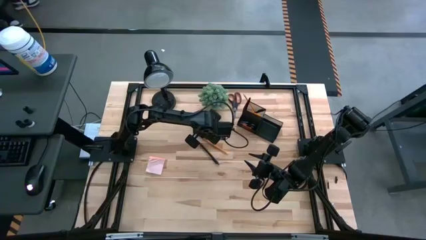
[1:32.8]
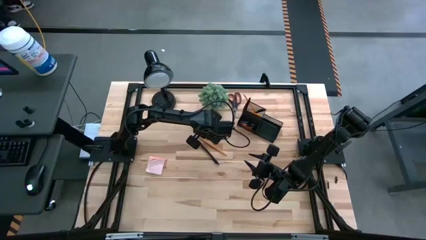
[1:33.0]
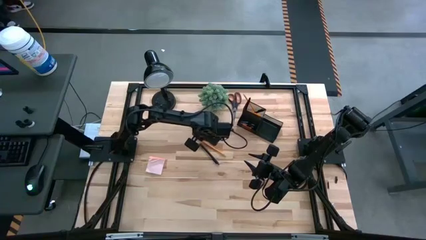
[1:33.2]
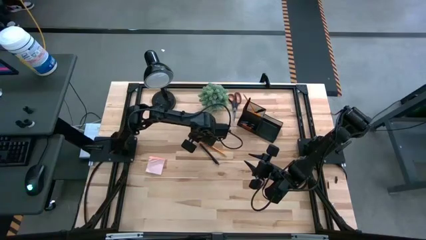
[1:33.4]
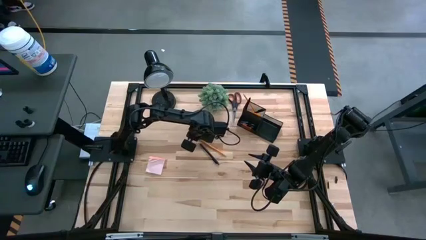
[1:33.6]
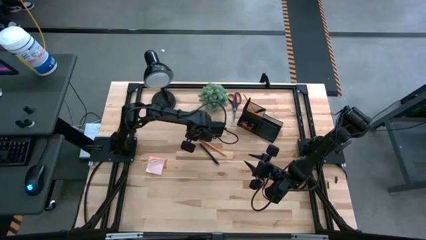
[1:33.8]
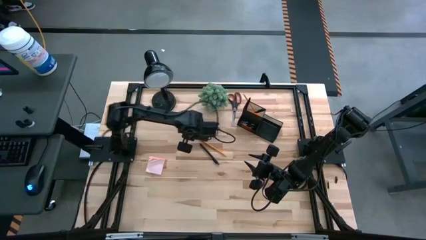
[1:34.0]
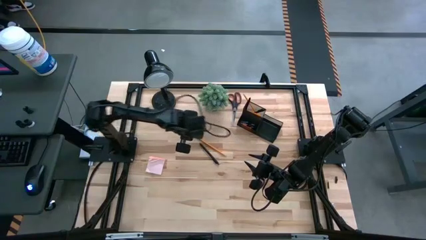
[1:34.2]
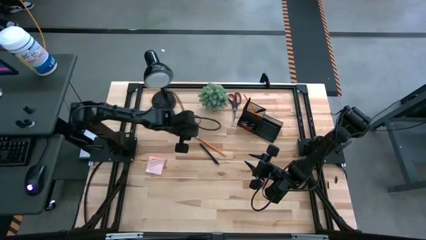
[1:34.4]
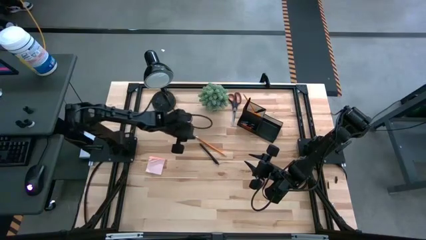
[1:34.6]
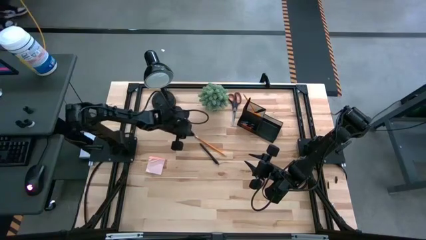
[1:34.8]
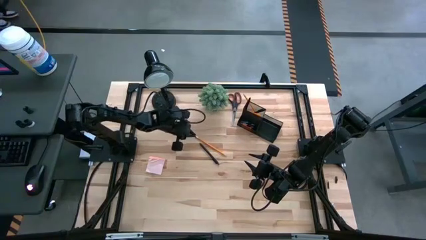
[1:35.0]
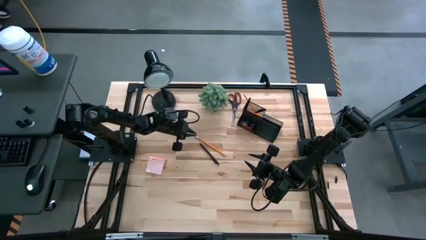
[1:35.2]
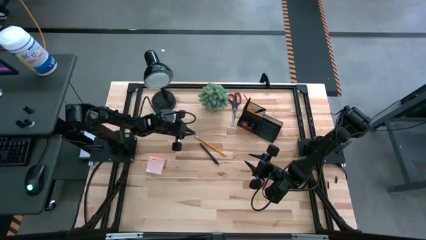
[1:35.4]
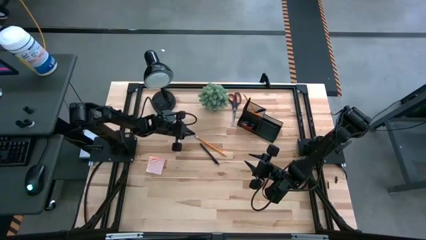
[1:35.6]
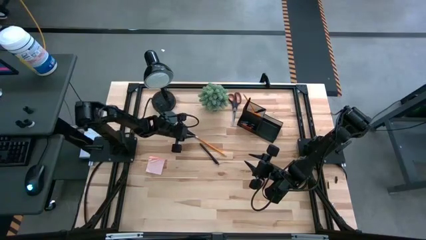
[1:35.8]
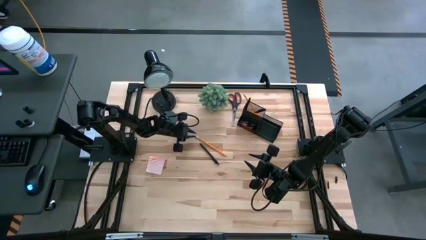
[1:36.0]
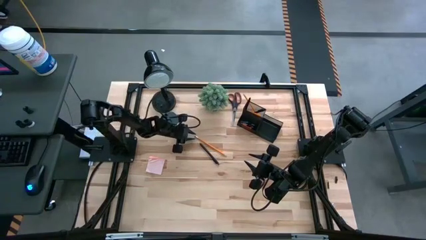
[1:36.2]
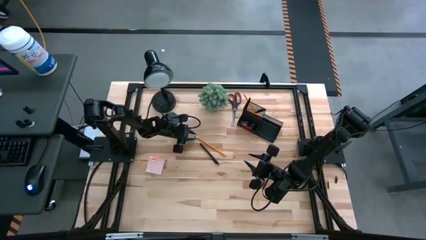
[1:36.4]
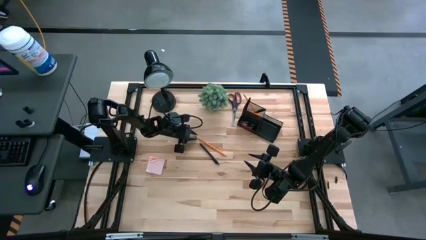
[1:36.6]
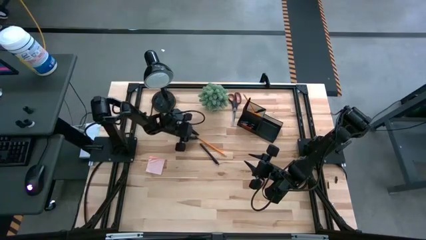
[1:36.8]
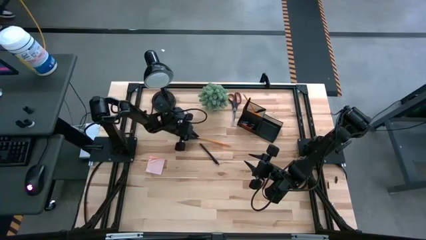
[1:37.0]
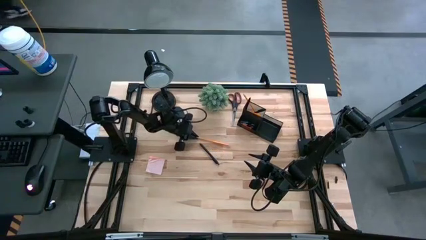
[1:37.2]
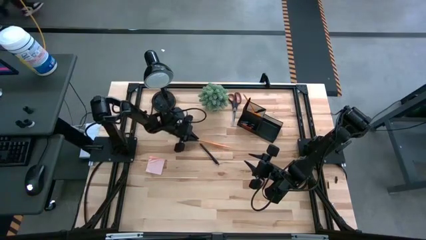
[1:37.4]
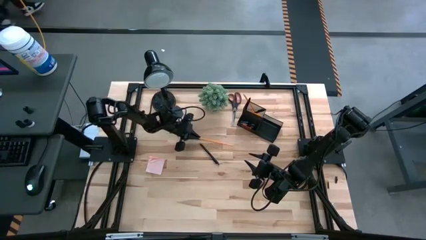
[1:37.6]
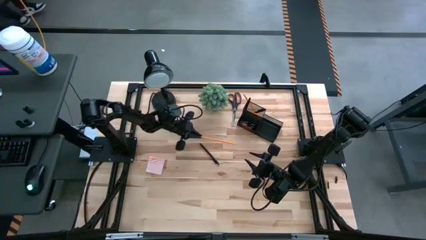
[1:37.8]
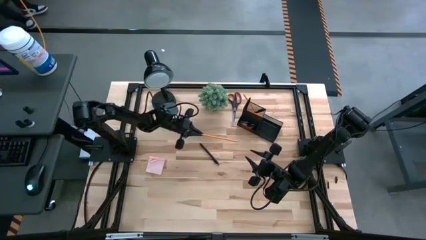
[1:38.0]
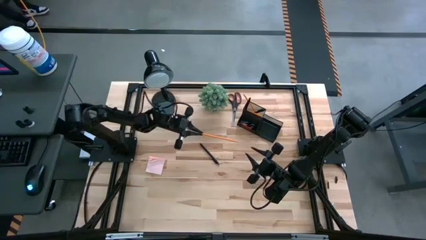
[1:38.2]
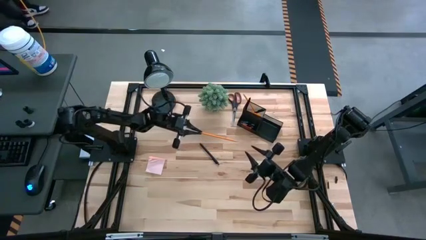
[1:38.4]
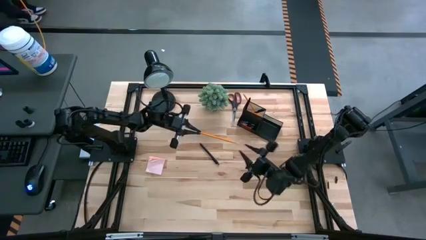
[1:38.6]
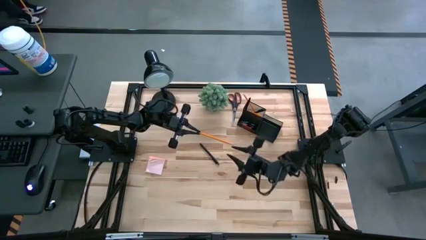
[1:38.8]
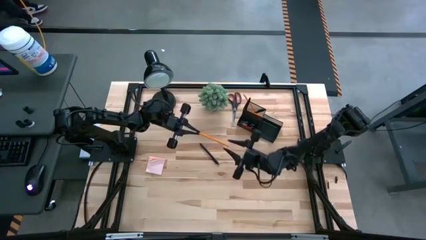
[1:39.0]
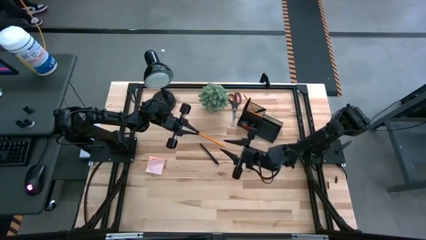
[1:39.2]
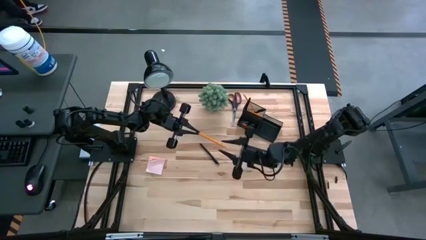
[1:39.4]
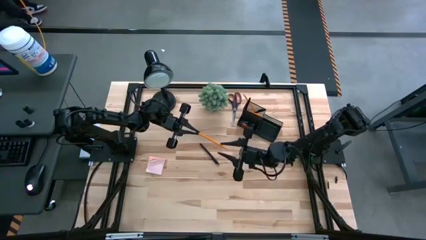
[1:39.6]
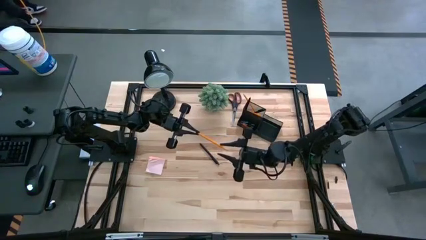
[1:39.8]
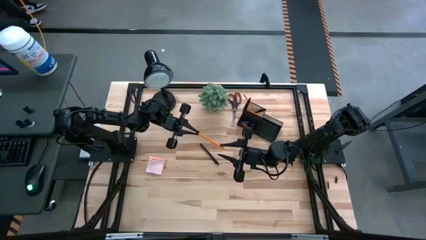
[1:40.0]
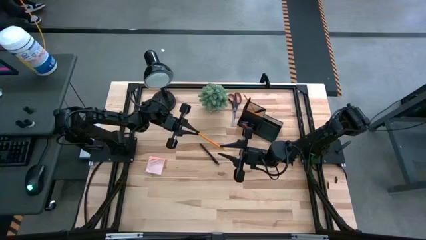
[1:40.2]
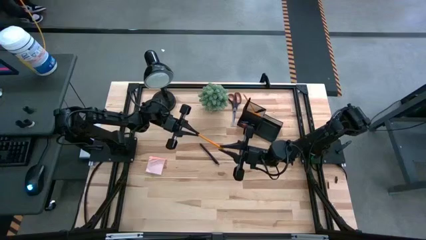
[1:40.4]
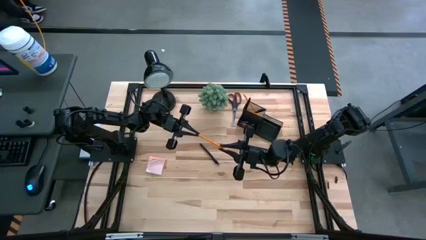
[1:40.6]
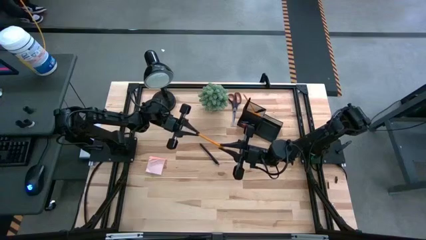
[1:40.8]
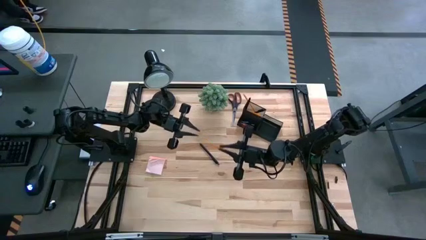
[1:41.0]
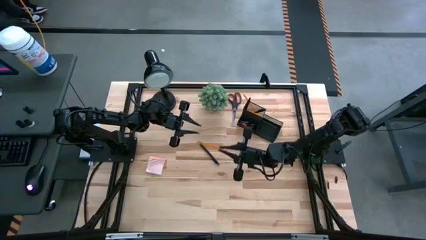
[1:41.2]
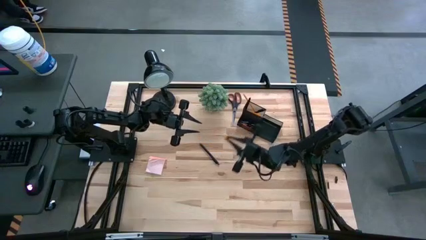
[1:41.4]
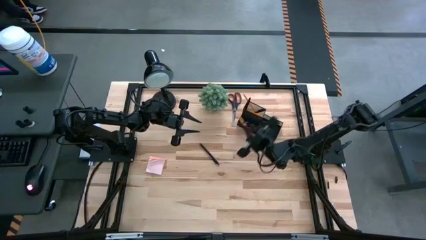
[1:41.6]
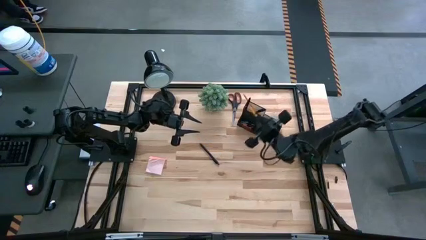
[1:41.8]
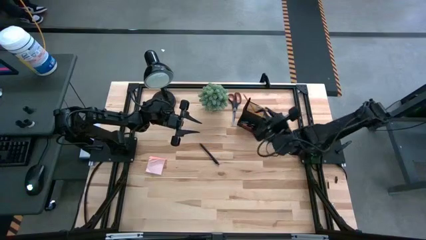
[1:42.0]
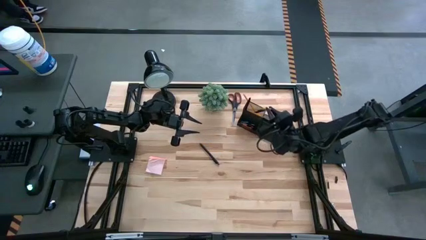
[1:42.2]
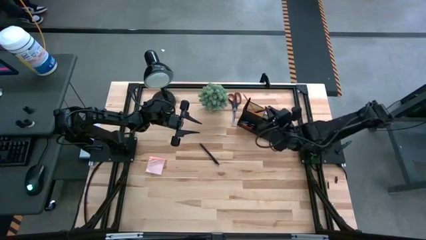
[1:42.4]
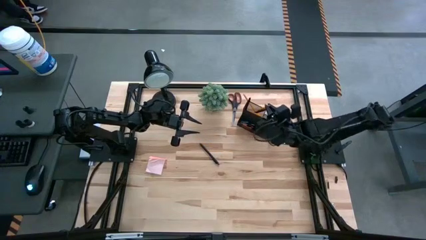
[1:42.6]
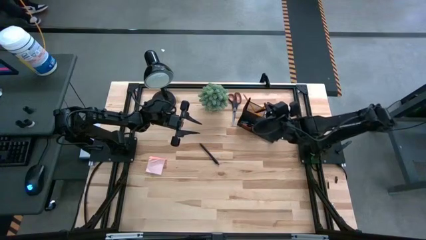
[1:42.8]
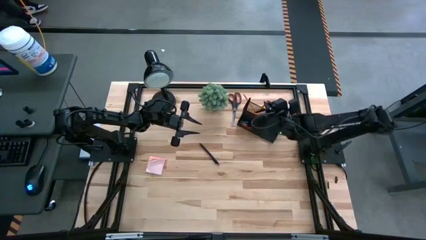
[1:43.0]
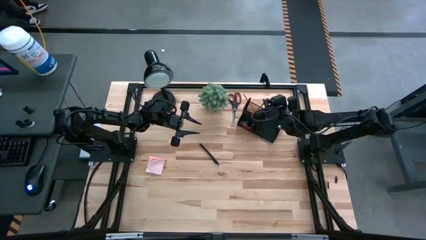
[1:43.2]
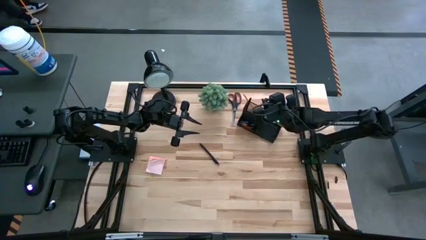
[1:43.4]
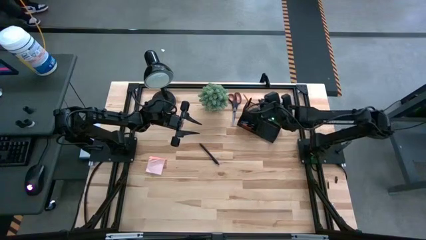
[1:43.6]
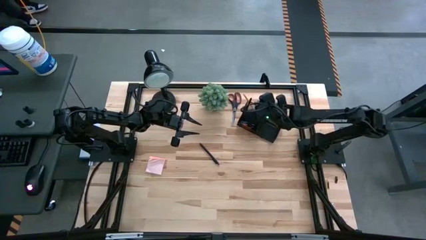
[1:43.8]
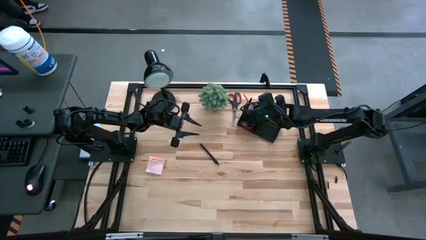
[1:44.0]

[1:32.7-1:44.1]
Task: Pick and place office supplies into organizer
Put the orange pencil into the black desk organizer
